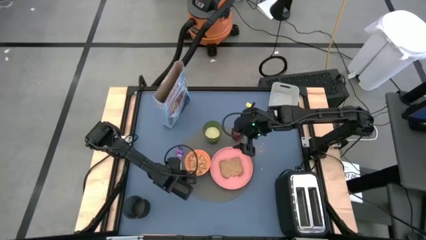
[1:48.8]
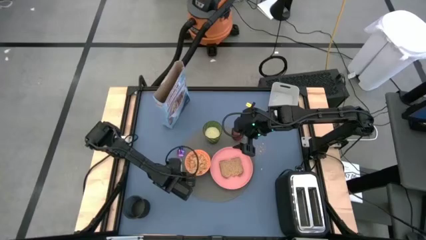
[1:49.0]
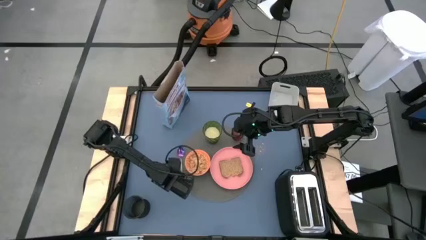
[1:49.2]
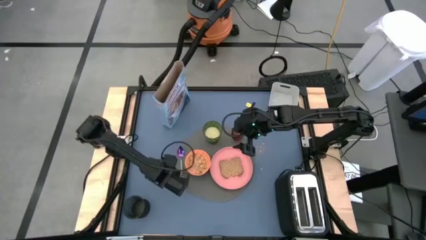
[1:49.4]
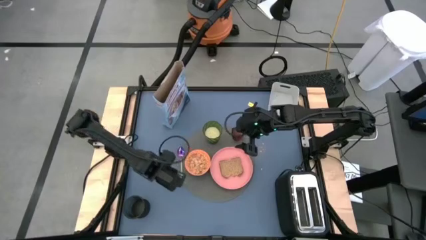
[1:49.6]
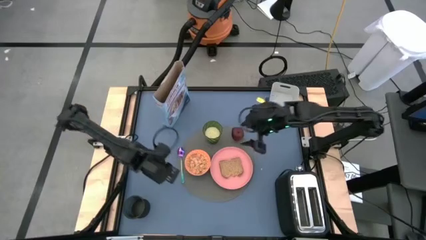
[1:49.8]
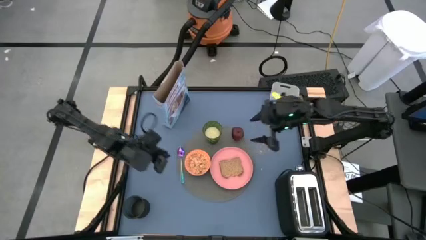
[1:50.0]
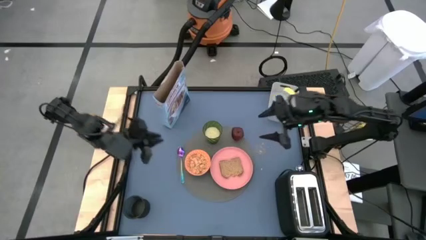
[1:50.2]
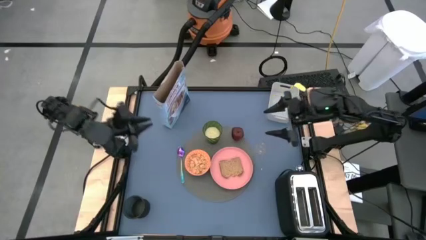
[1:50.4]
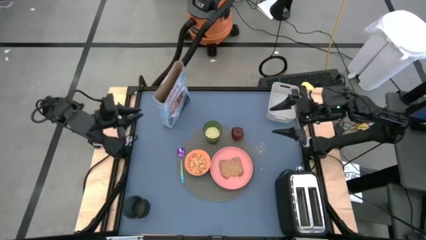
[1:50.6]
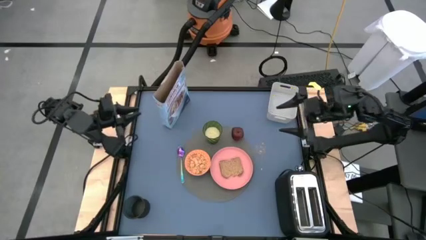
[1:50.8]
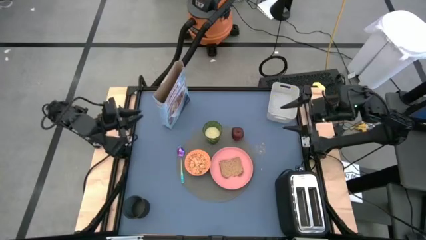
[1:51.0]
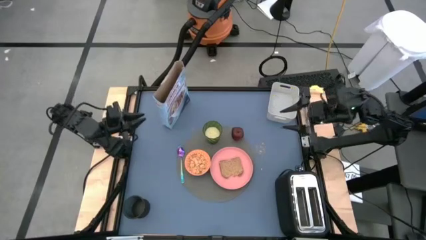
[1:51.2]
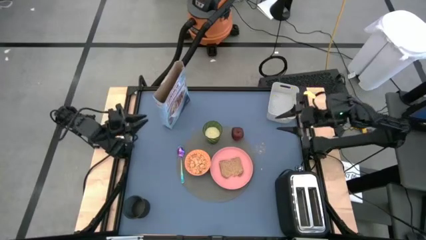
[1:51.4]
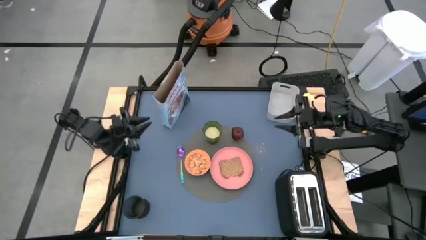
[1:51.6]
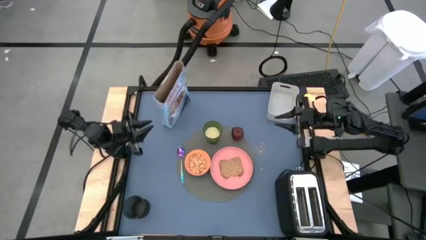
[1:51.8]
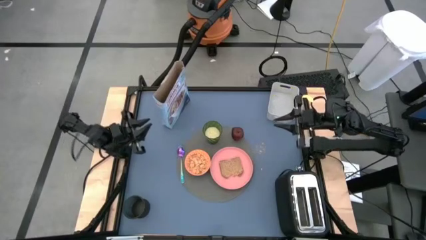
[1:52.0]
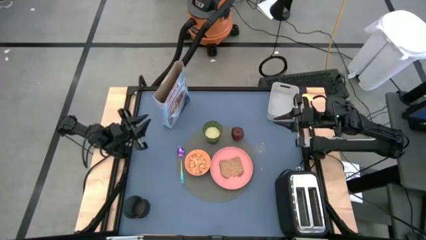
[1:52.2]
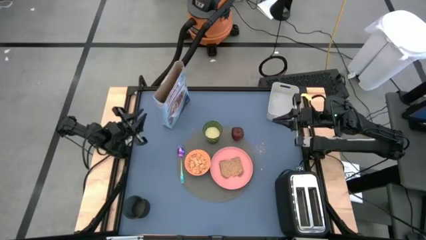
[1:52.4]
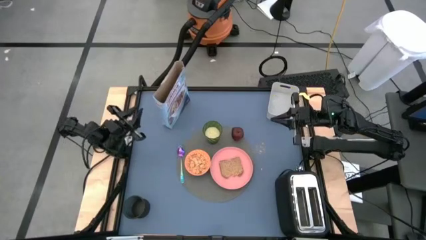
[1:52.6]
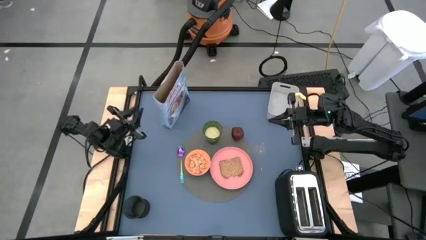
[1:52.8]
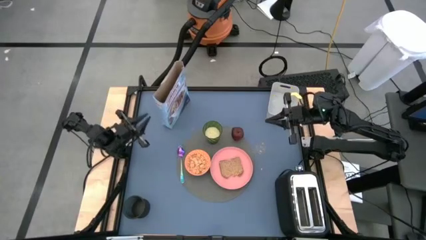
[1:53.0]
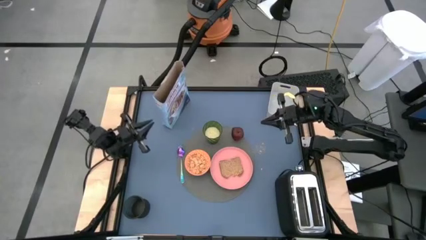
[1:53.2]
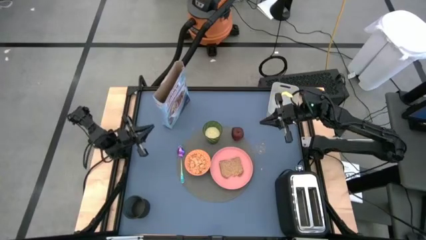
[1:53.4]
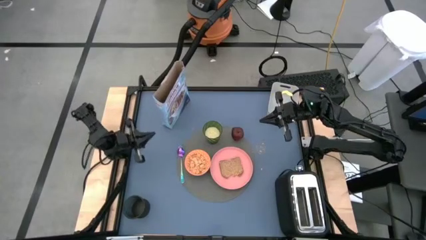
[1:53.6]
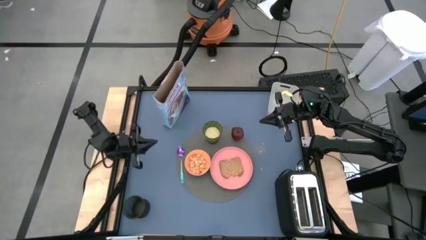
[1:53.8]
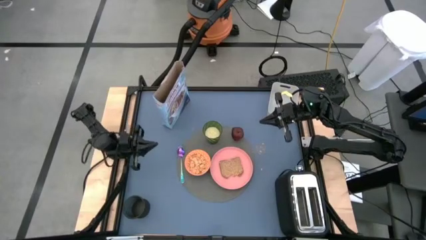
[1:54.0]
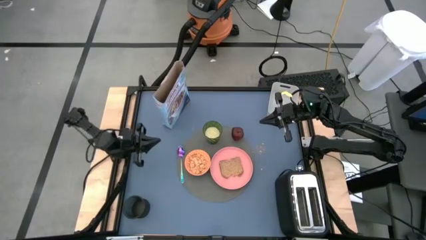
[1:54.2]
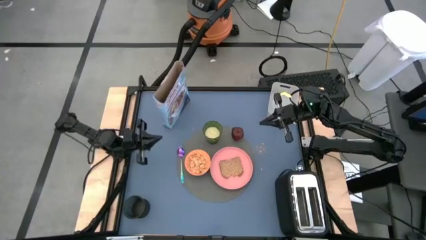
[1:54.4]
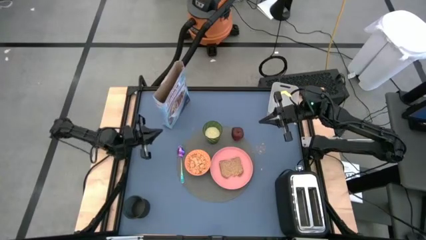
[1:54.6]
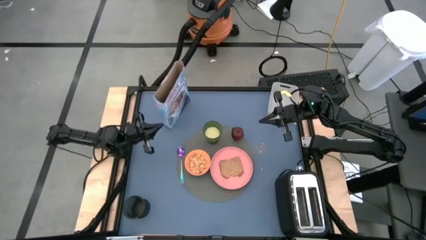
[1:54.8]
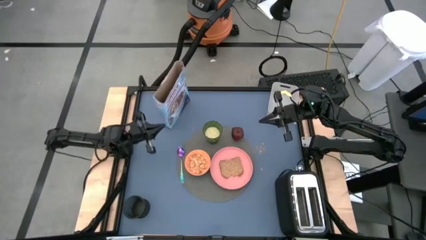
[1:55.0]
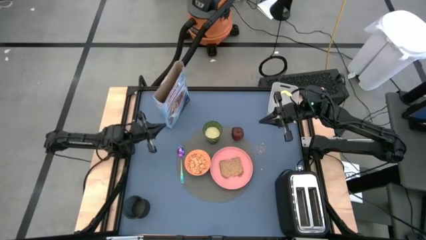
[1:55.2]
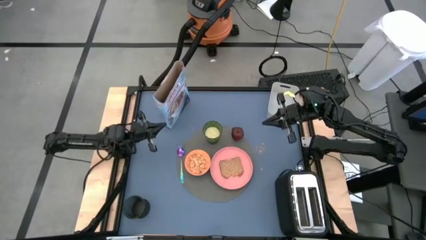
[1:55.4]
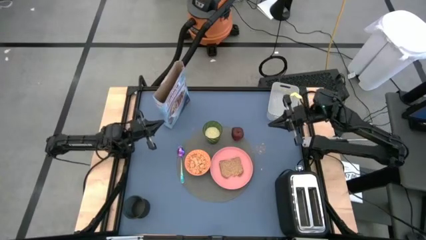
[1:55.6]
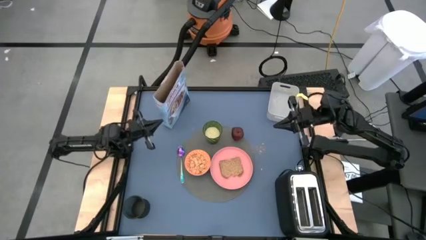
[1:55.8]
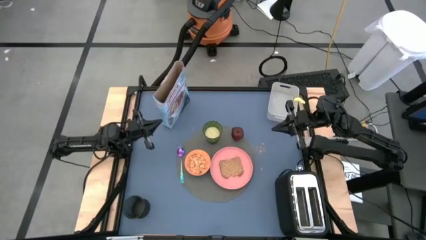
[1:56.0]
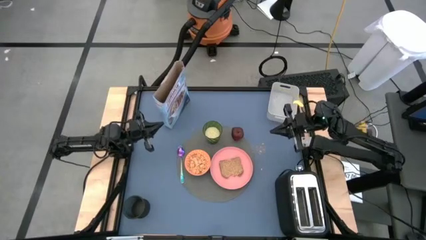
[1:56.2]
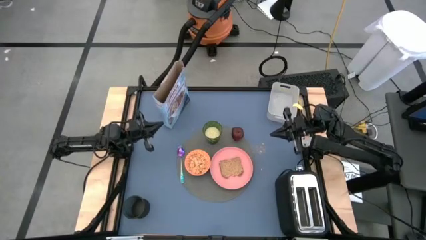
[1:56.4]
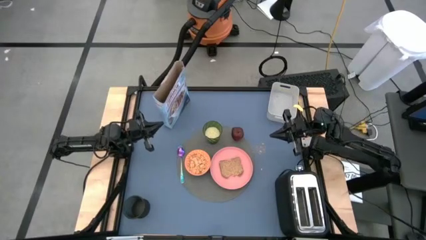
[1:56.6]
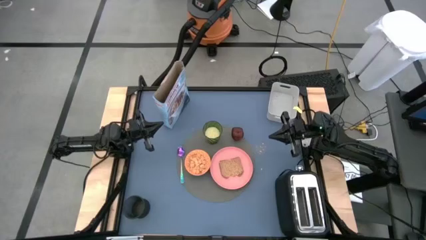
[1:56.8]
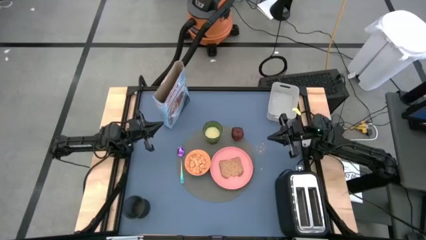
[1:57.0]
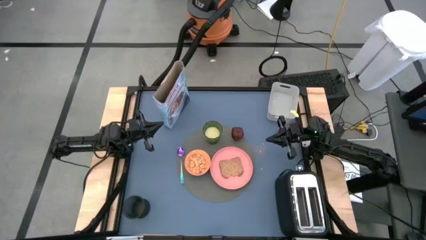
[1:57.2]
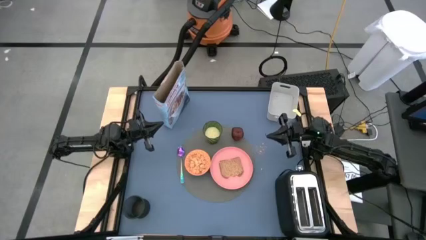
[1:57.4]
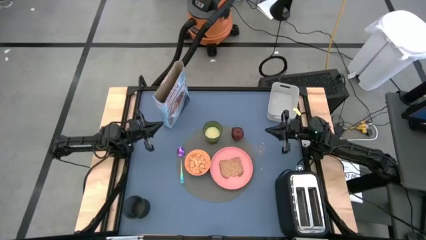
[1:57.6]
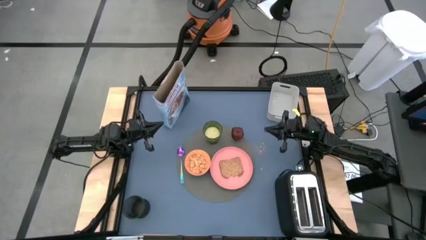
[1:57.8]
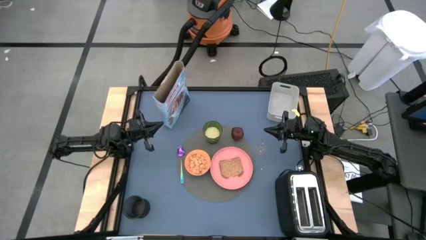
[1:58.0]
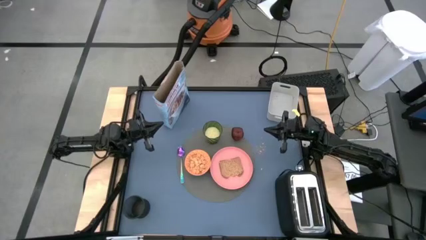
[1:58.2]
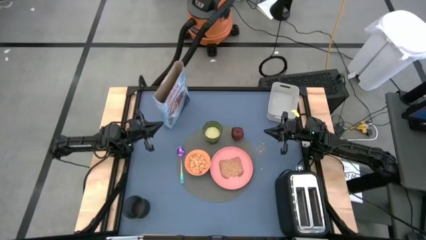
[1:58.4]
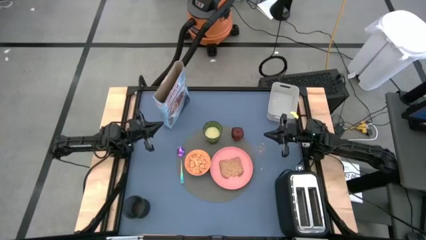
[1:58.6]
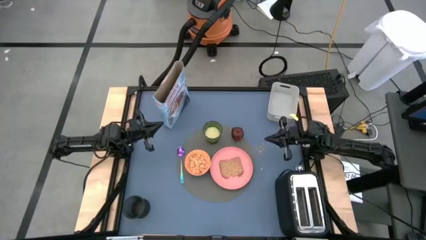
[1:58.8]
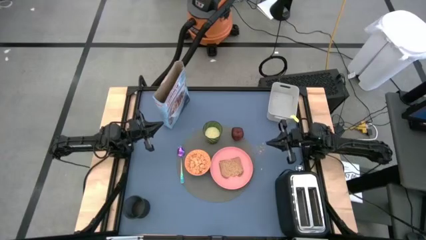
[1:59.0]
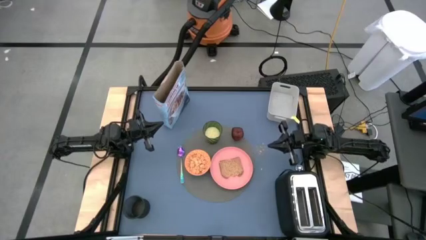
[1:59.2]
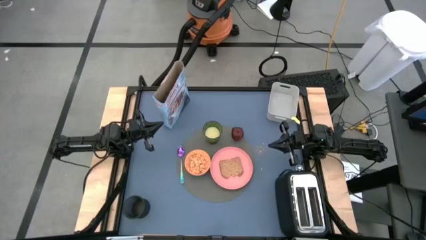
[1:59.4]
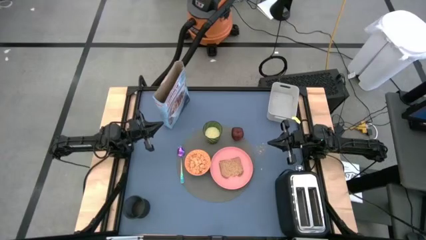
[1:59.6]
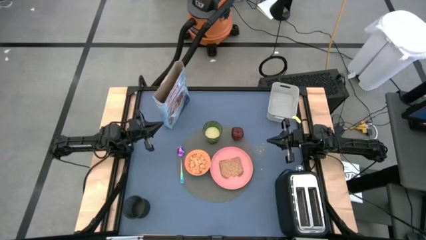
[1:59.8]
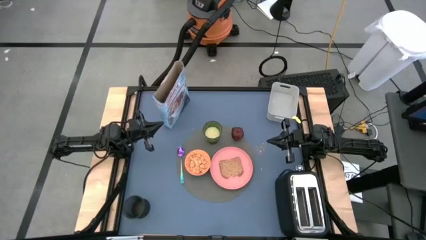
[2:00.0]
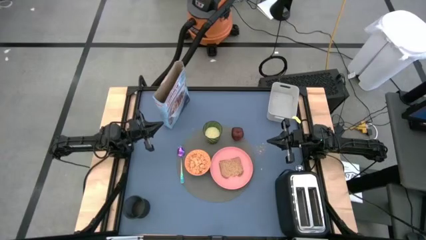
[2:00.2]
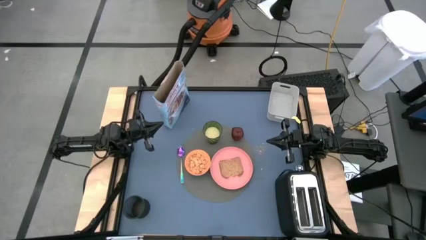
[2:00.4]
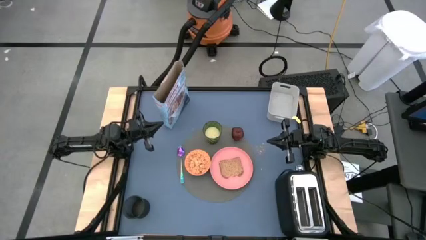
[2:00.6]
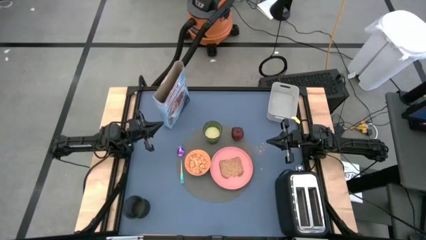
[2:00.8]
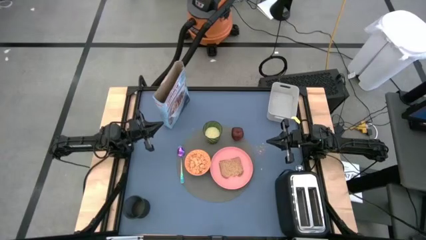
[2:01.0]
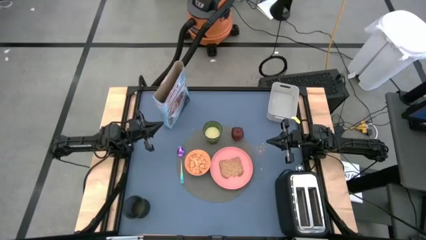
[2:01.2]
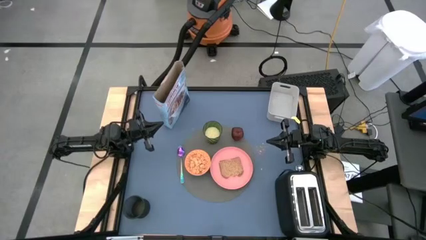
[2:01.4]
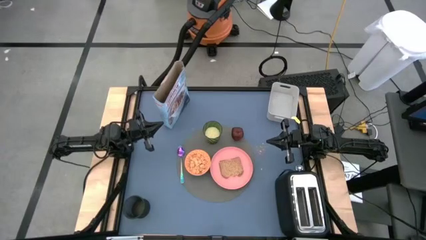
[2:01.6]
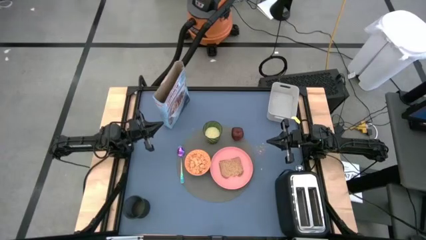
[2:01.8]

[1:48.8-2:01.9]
Task: Arrange a breakfast setting
Return to Home Position

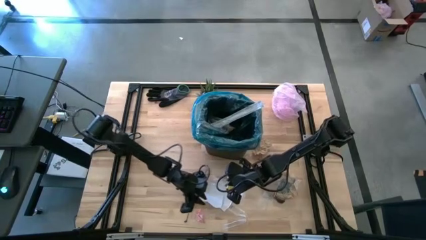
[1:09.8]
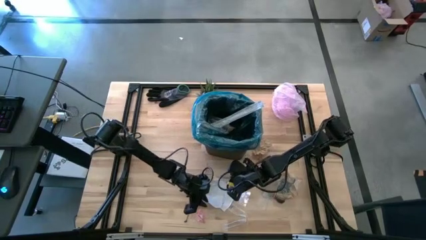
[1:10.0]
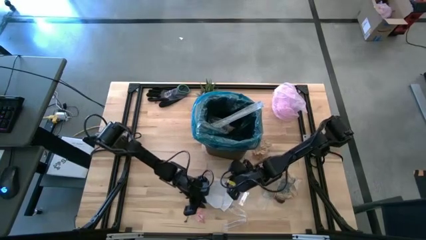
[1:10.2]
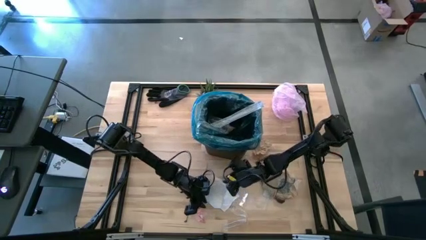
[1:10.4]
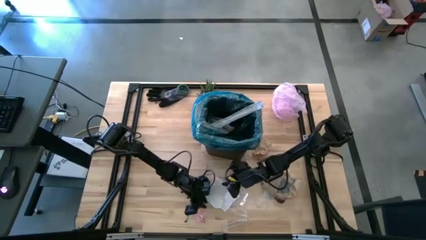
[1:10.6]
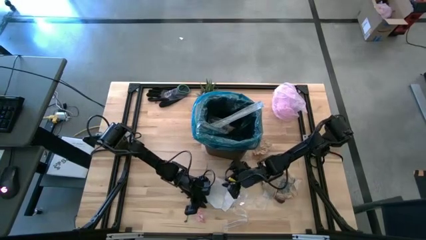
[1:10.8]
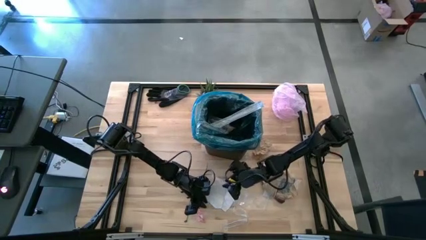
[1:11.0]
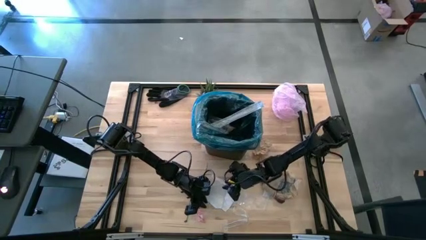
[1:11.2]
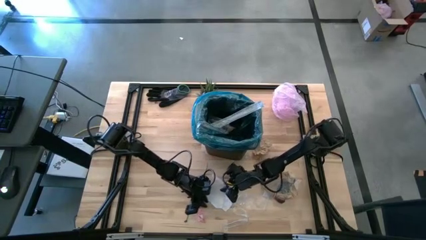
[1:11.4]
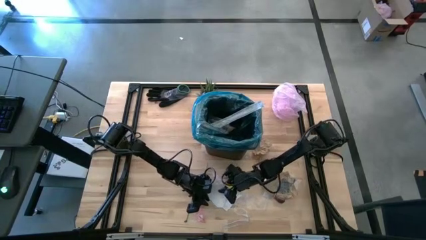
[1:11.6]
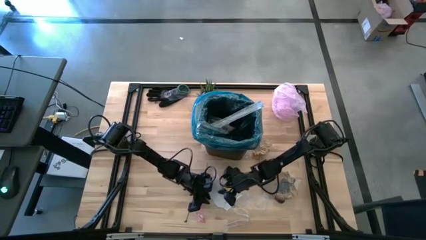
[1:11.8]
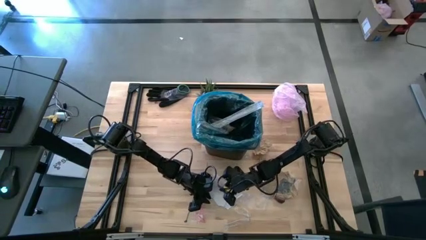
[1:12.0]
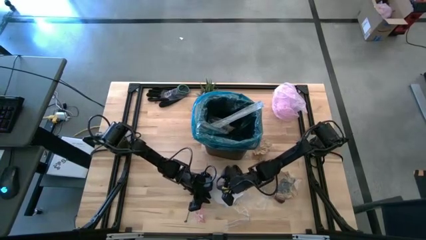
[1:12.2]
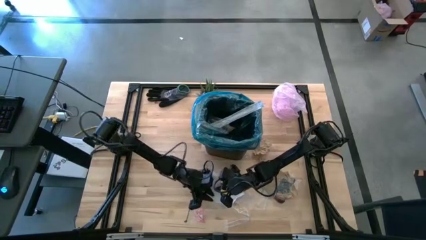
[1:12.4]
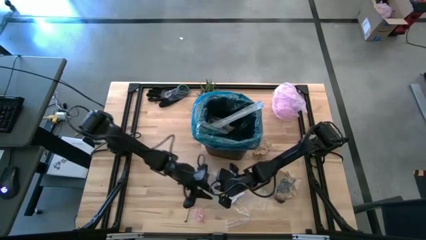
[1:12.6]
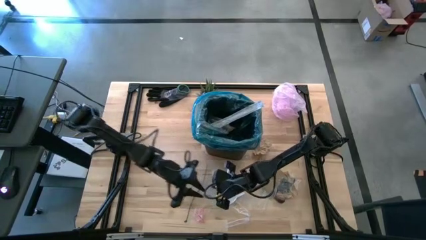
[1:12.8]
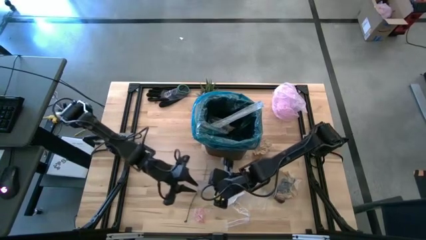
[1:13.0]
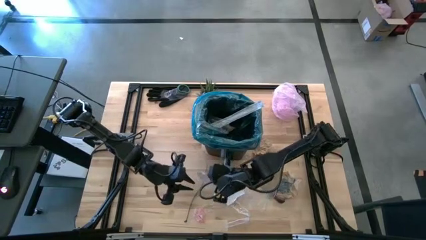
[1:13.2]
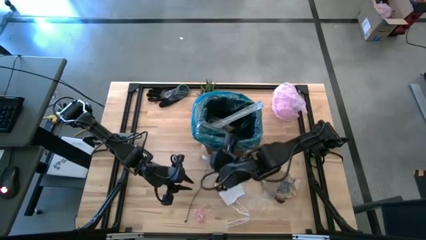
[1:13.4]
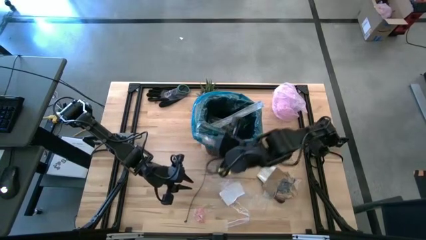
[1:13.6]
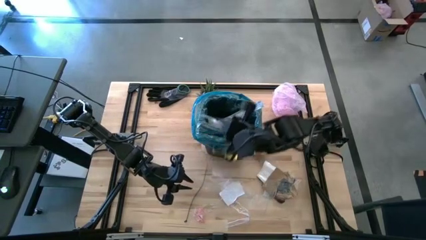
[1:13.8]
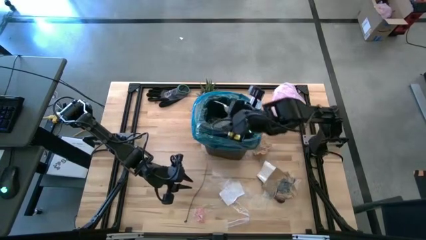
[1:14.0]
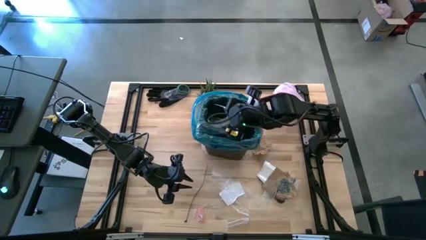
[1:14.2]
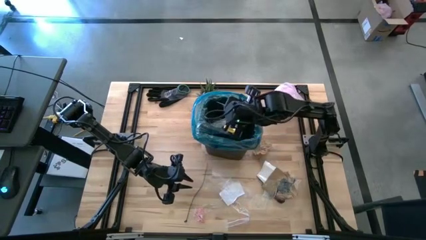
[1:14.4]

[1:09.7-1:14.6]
Task: place trash/remove bag and relplace
Put the white paper into the trash bin
